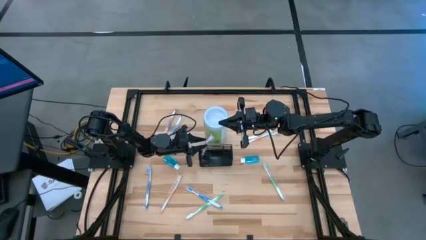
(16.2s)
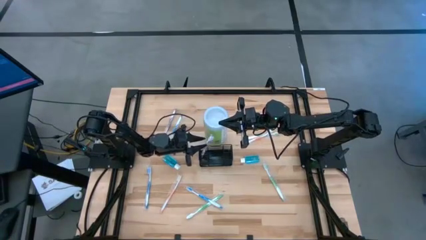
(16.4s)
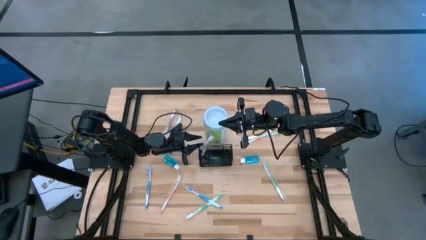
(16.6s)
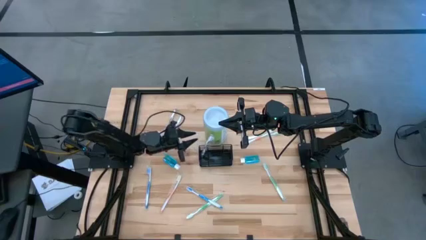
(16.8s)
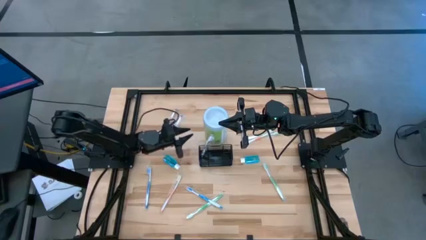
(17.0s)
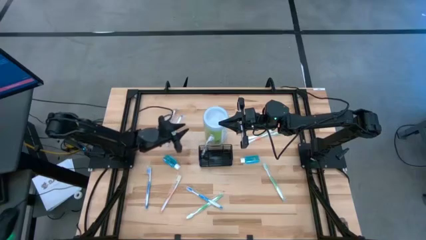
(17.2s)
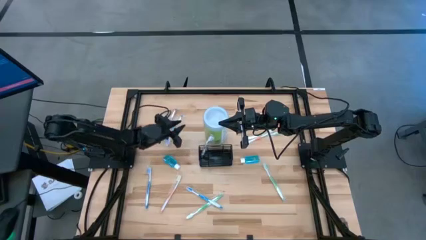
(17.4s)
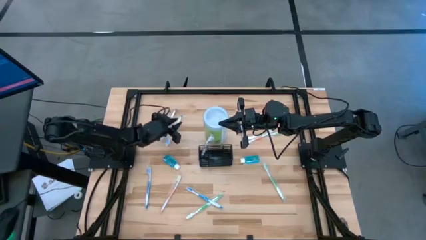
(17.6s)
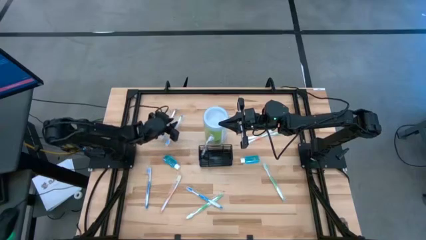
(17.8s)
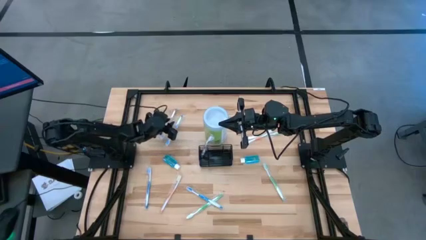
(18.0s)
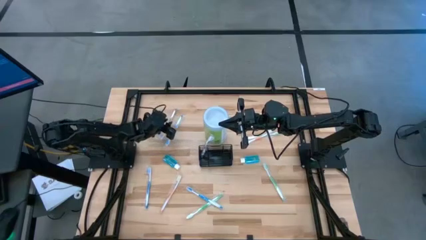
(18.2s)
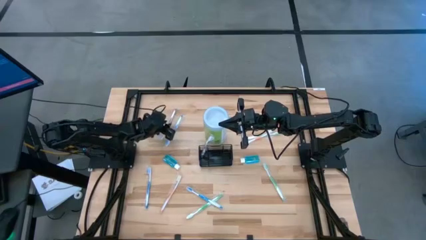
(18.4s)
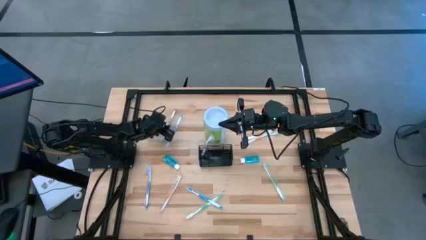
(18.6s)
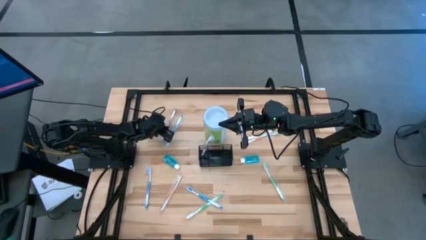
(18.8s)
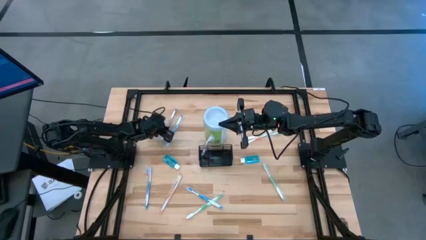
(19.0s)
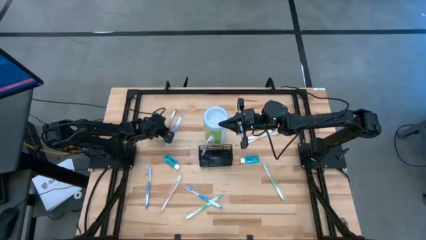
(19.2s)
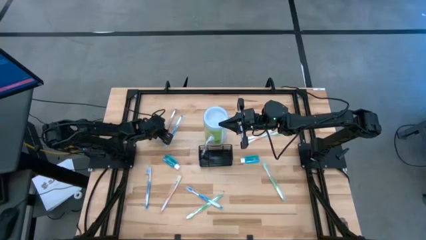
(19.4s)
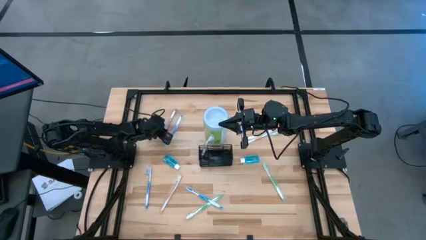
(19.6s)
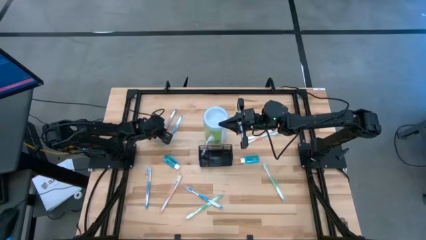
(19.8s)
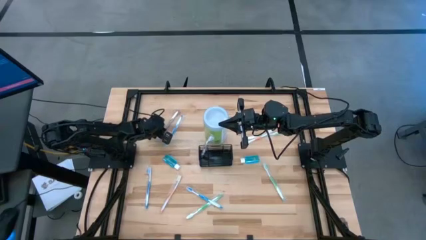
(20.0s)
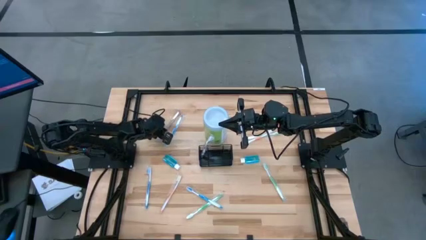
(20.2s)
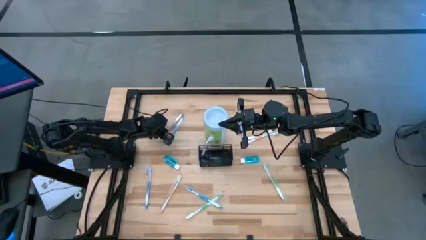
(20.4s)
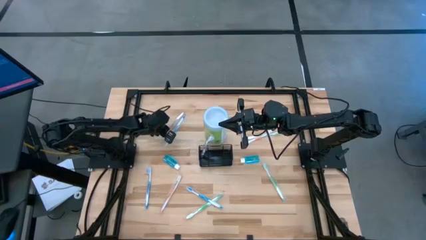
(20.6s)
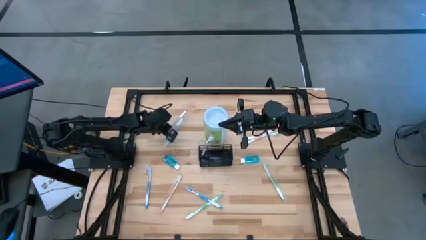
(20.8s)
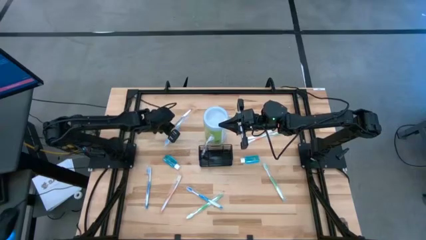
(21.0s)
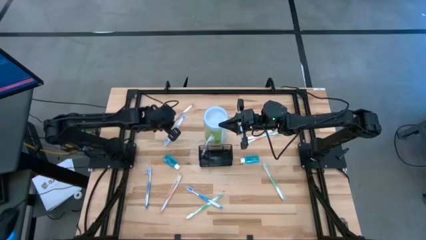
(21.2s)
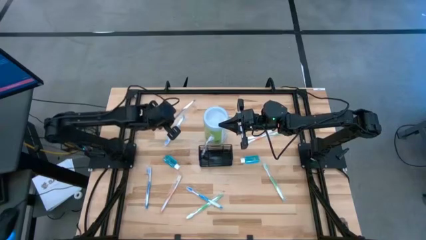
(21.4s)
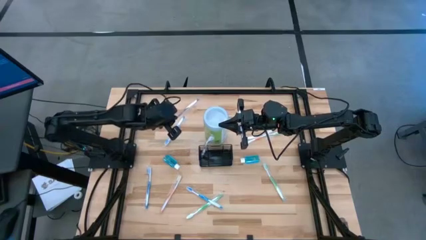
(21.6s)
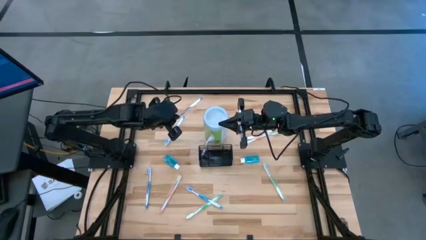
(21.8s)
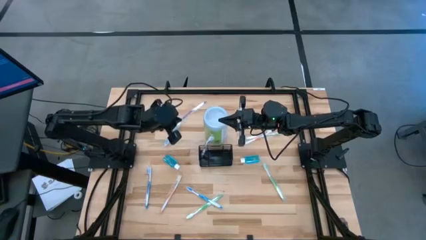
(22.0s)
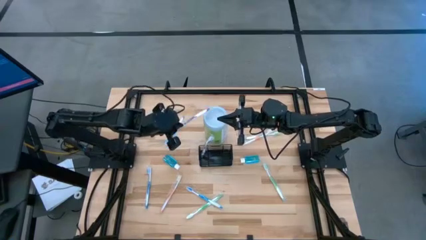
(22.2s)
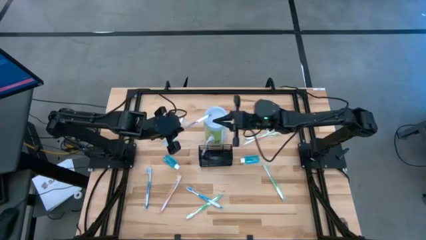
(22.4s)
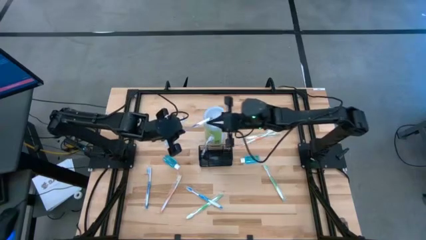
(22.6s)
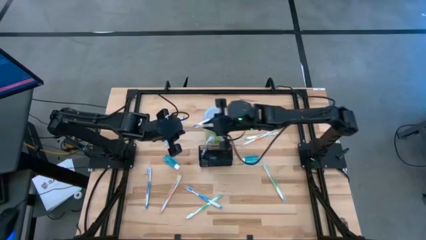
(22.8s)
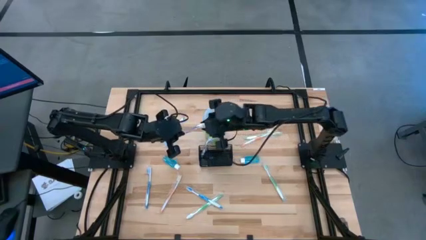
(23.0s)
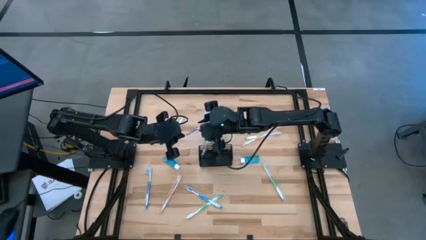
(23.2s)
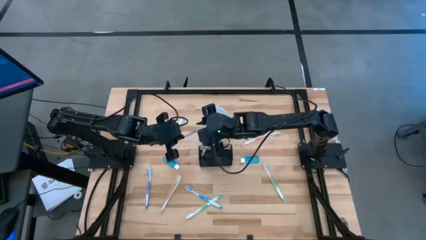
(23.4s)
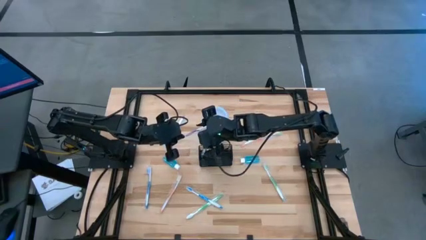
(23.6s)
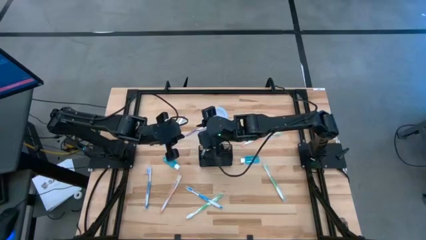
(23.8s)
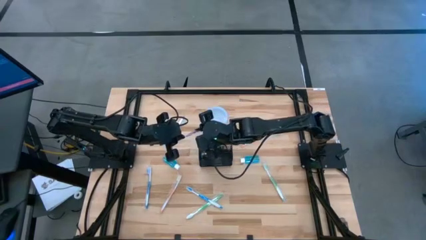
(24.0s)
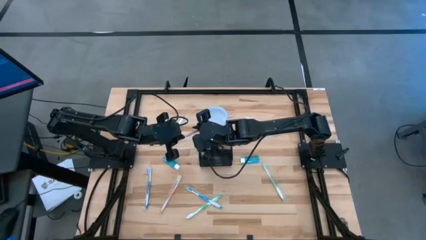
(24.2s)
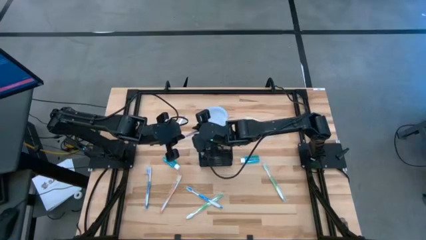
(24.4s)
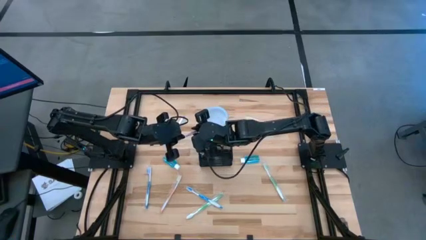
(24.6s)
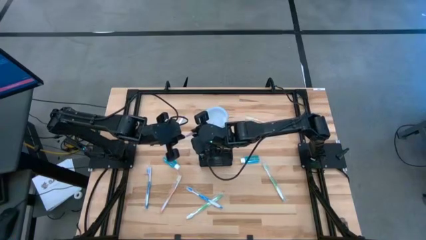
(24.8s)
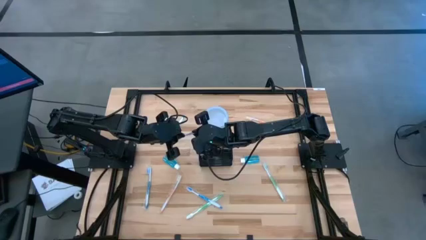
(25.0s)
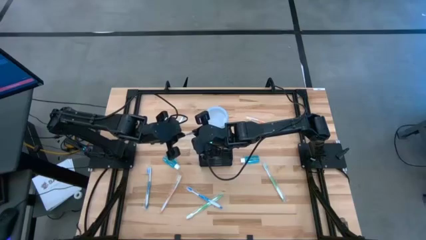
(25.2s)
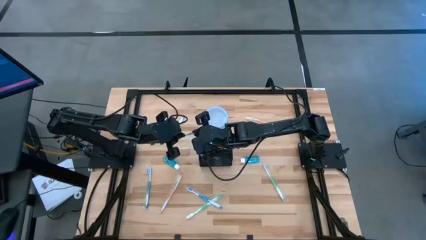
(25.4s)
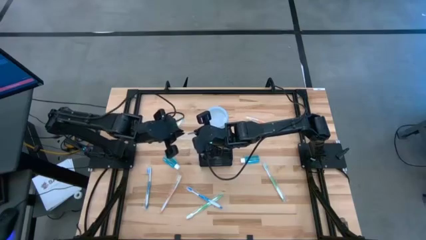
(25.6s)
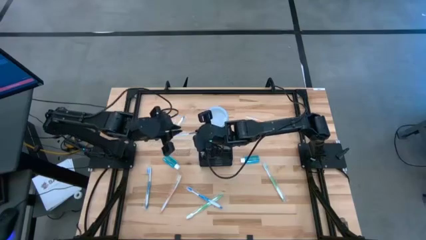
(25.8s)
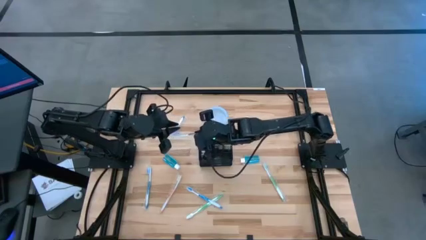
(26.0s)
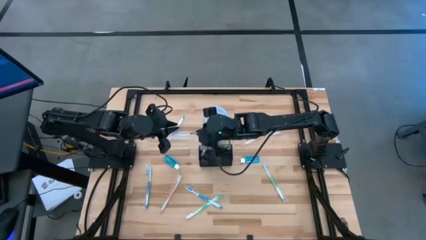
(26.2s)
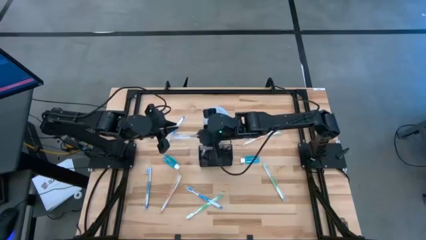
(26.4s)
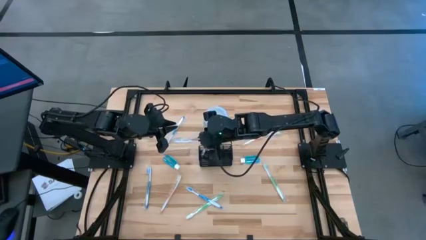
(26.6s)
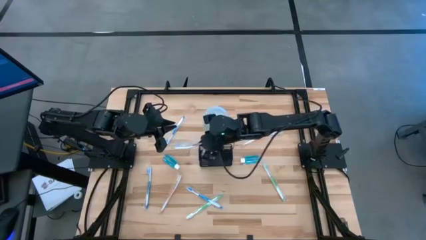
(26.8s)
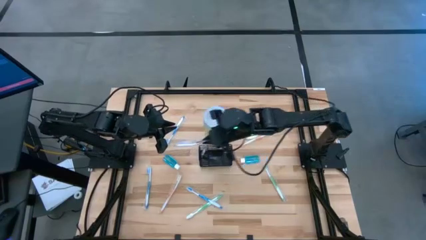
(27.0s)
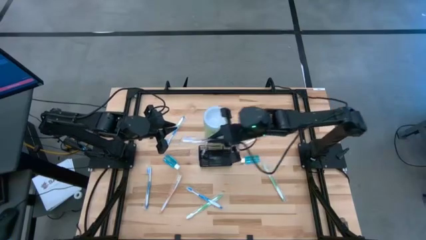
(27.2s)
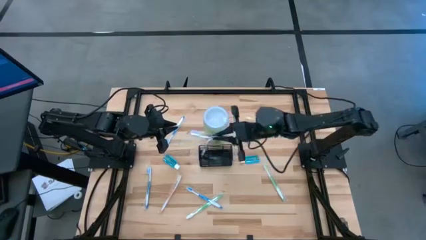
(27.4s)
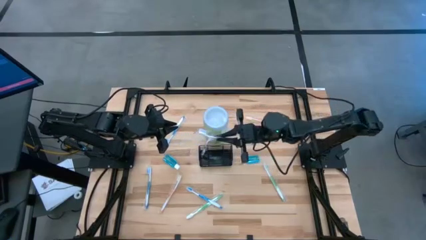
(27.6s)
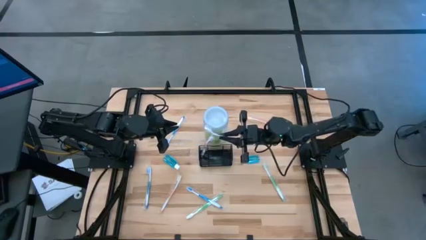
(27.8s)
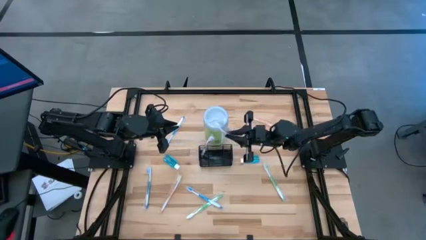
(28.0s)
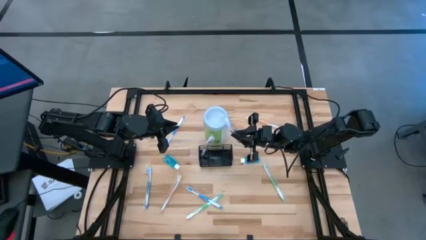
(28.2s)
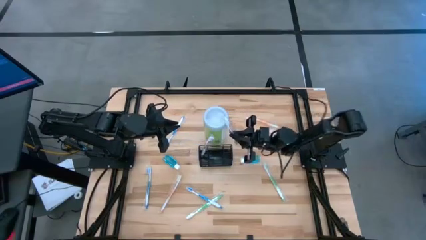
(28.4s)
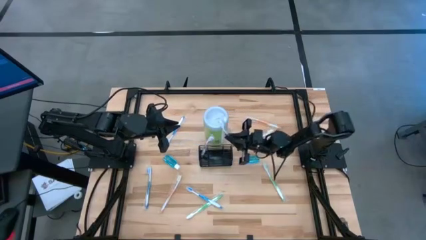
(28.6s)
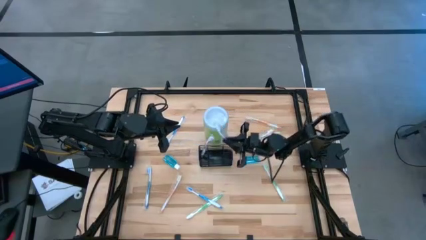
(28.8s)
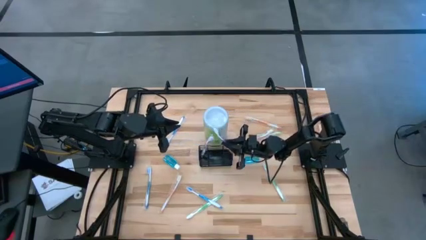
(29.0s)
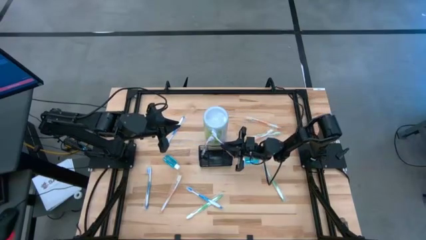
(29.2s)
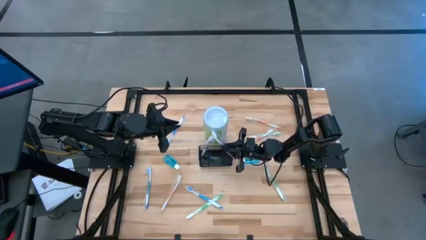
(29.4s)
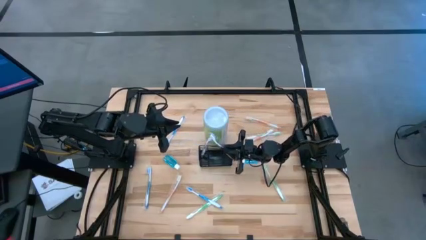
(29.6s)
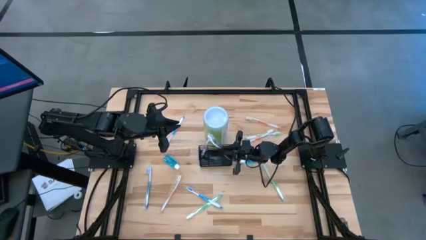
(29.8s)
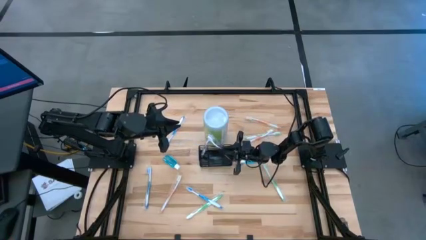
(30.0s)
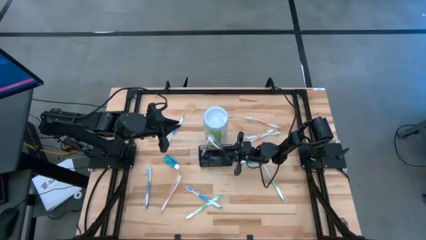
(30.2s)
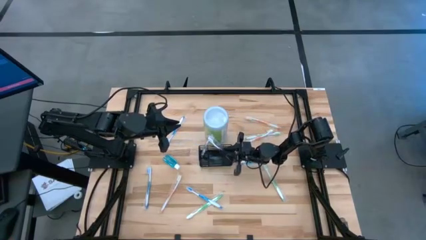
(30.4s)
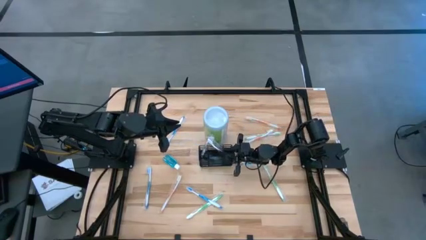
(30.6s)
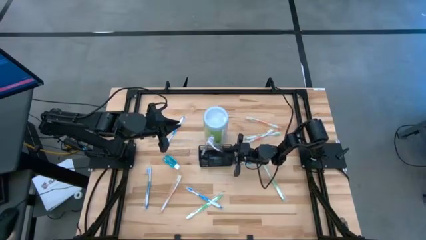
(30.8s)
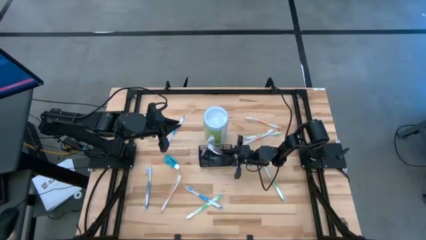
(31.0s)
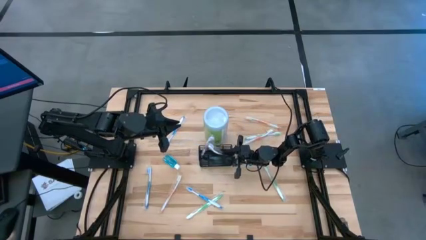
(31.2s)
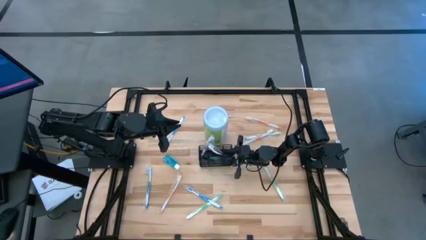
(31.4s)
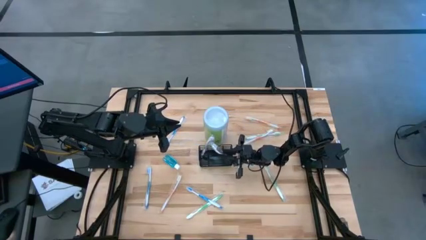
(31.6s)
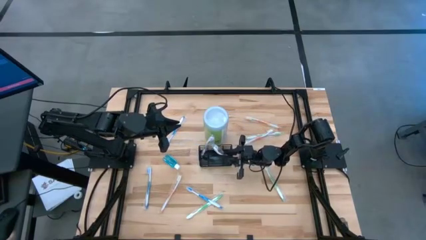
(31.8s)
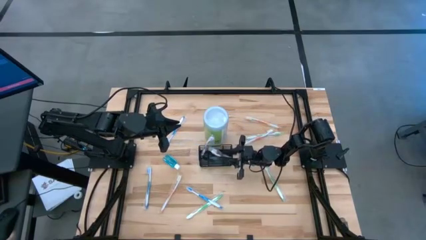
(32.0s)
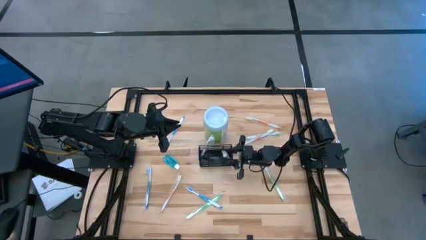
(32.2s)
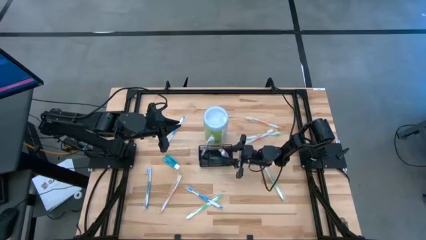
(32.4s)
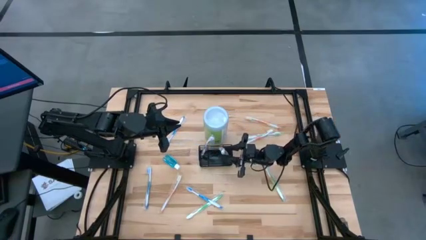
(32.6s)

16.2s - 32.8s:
Task: Pick & Place toothbrushing station
Put the violet toothbrush into the wire organizer
